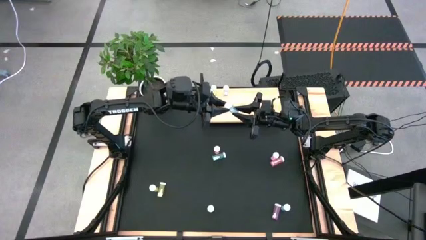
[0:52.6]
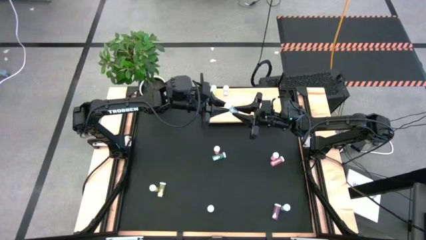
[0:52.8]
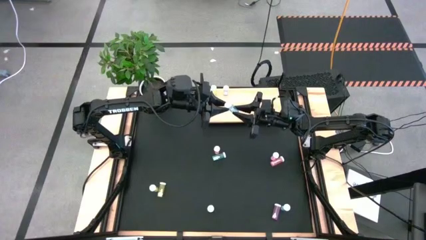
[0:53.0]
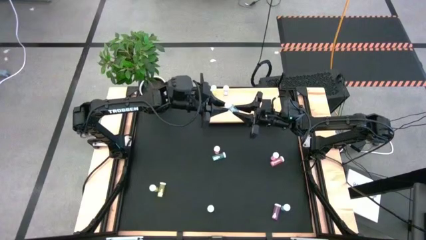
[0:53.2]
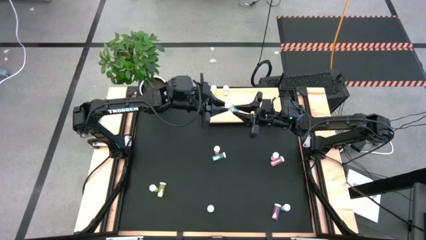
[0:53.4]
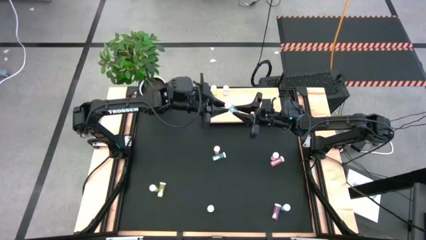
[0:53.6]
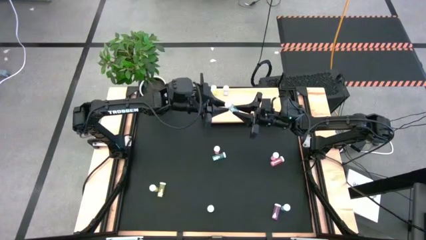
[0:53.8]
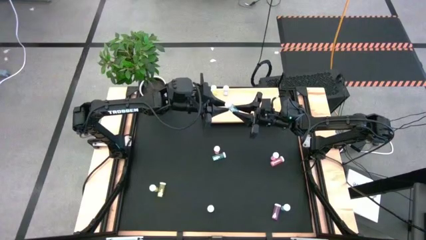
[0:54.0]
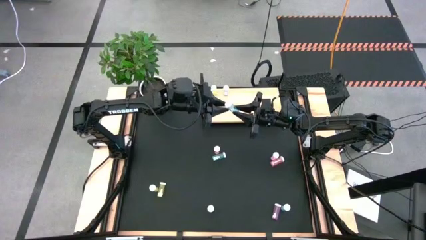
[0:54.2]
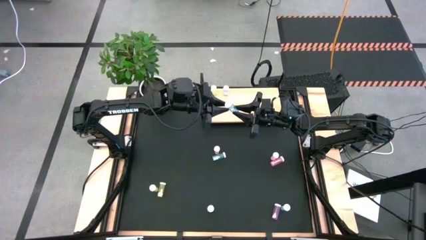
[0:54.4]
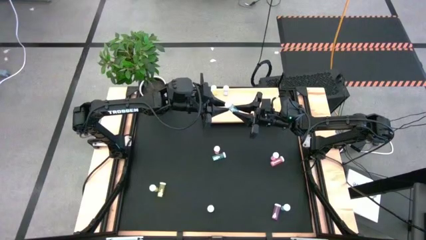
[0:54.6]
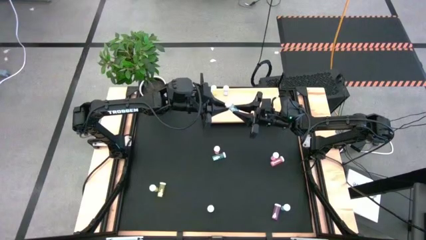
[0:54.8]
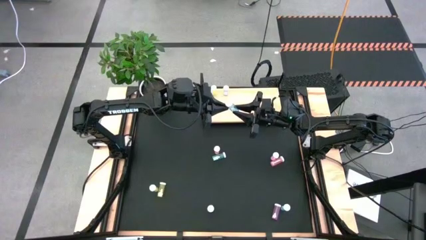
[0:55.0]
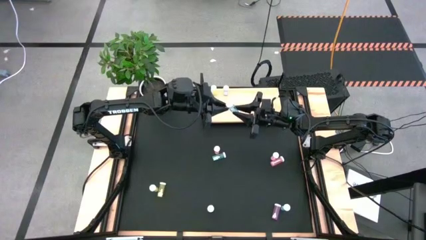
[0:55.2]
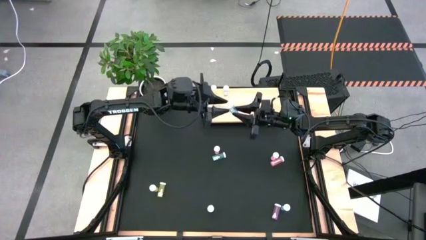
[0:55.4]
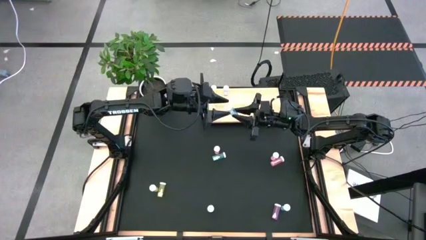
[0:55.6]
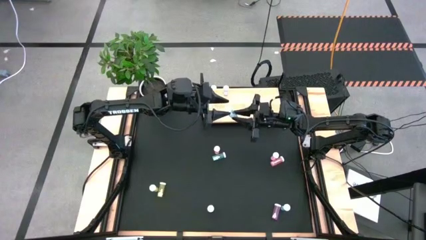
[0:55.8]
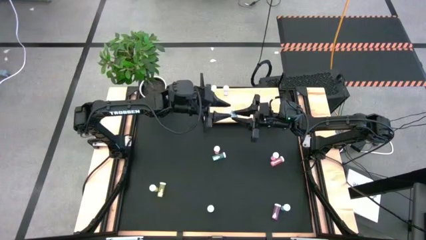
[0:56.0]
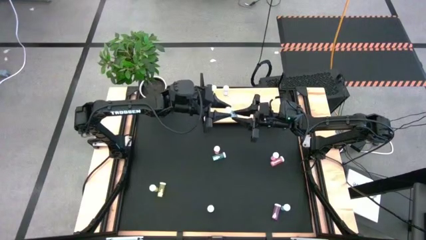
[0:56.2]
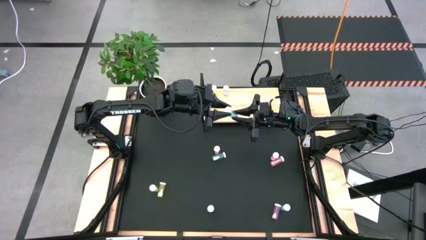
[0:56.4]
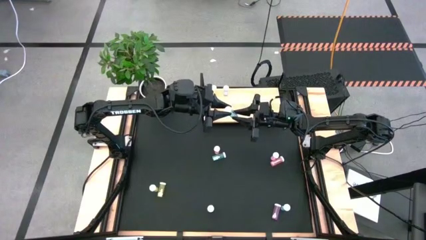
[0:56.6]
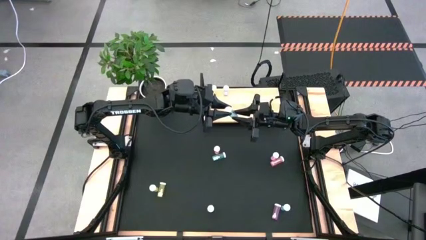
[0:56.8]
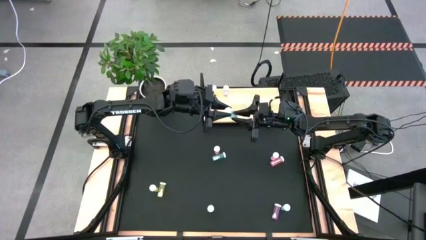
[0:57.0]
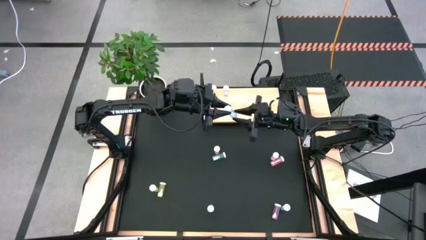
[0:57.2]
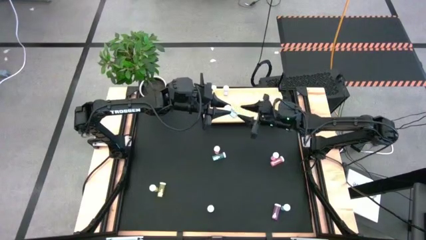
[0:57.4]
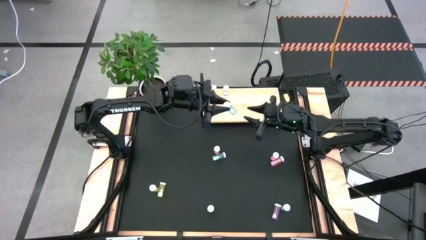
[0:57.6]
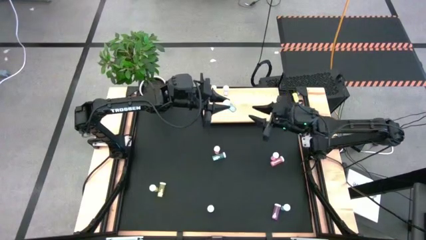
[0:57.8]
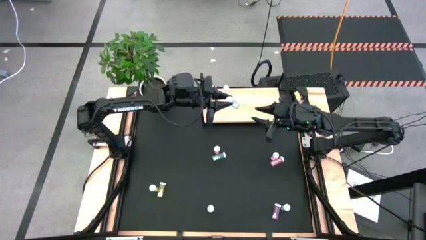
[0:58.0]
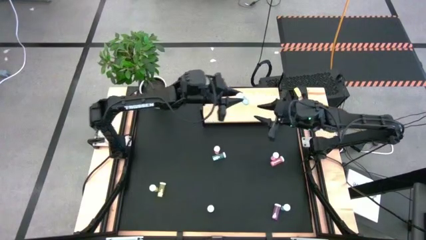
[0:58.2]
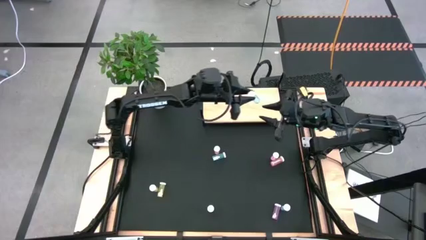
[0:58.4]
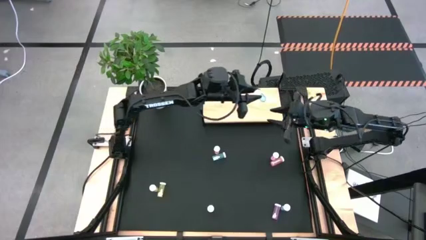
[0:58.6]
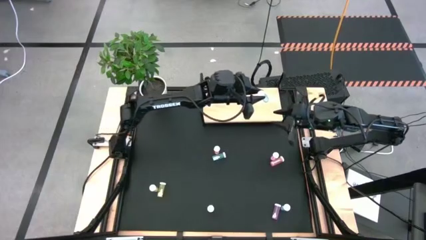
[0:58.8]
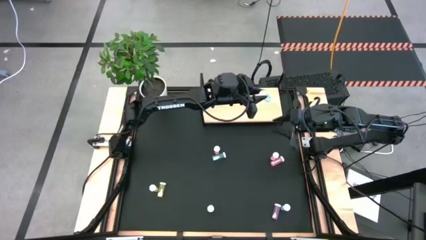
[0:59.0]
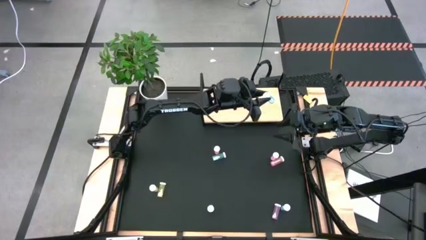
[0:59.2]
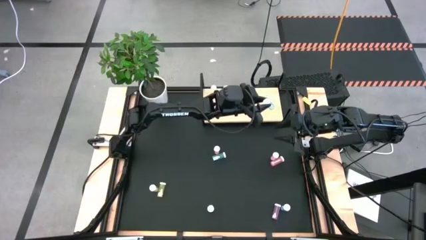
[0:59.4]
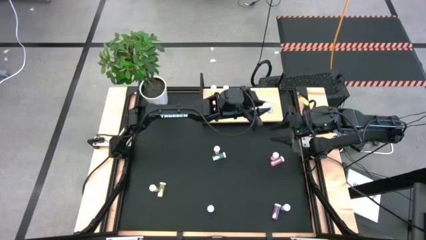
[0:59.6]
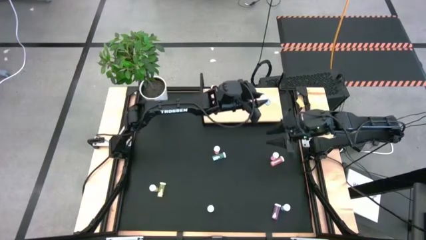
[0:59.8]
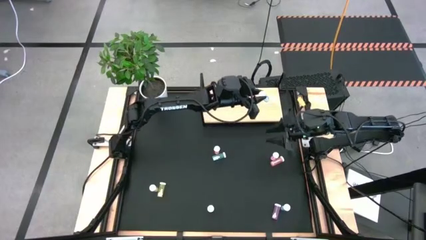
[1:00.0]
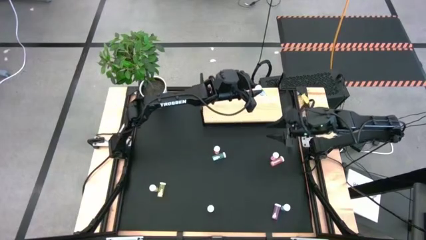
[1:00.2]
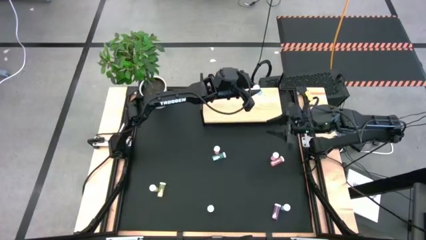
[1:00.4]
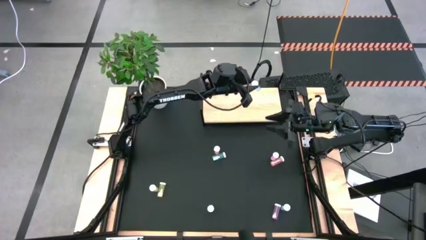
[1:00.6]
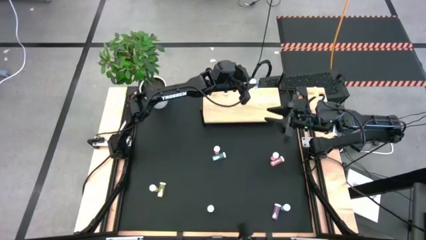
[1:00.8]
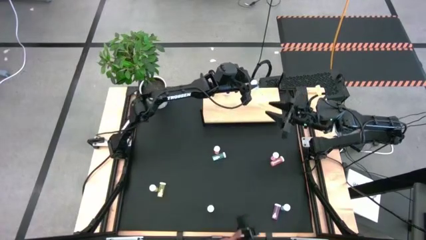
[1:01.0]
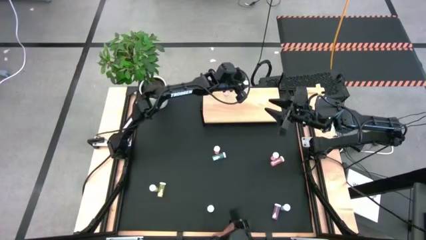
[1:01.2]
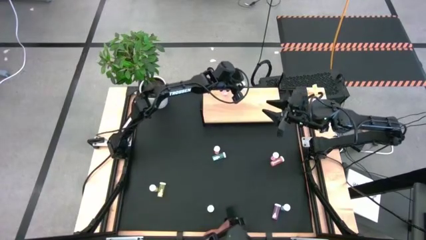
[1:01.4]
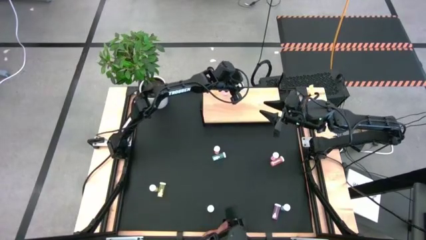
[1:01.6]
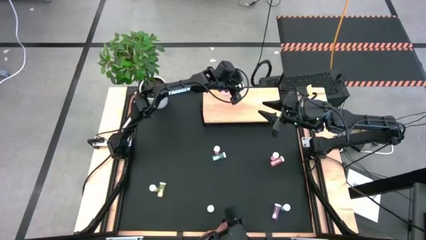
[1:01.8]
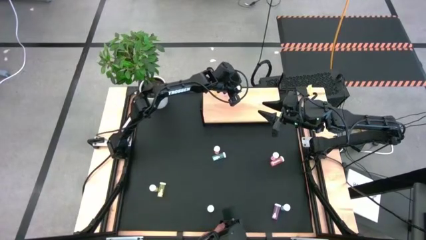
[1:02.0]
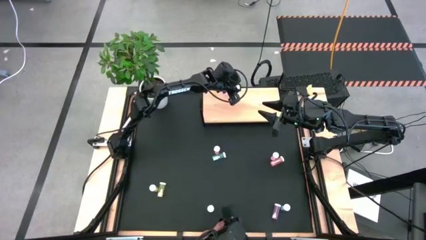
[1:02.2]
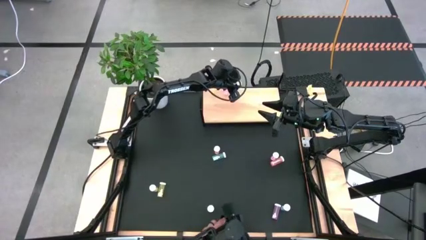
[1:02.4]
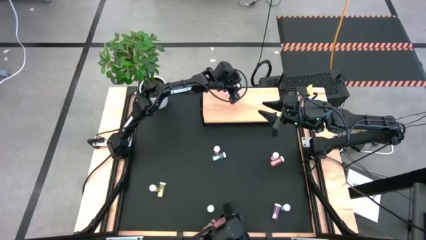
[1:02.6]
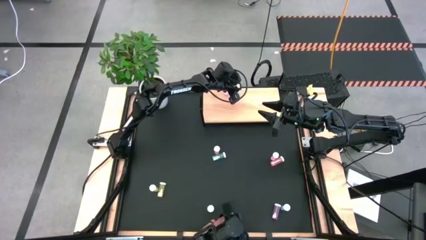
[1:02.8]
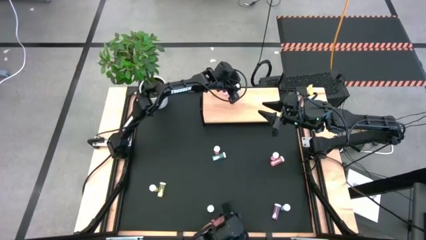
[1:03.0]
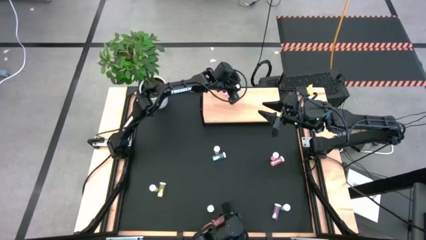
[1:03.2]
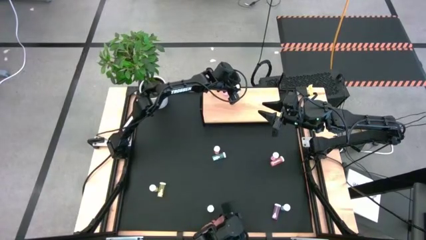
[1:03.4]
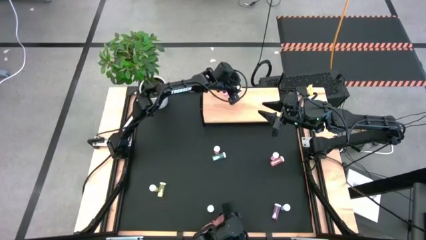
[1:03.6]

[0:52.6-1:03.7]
Task: Pick and place medicine bottles onto shelf by color
Put the bottom left blue pill bottle on the shelf

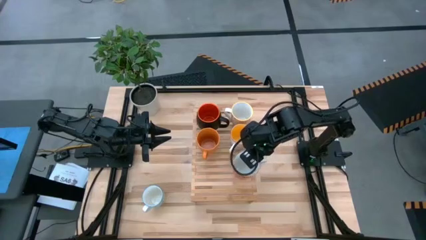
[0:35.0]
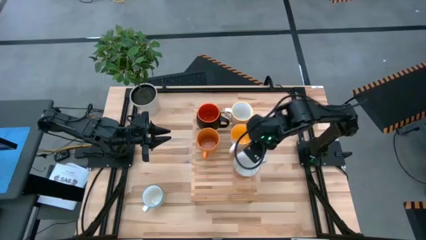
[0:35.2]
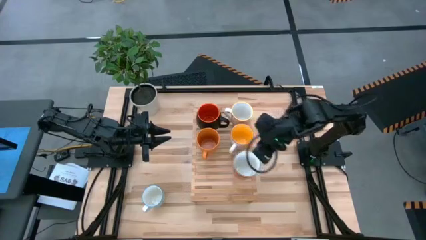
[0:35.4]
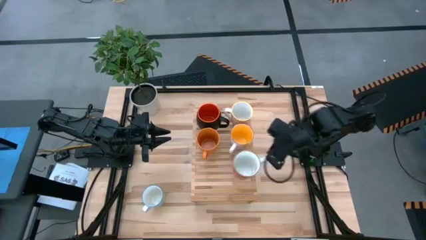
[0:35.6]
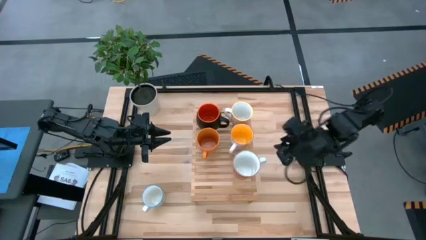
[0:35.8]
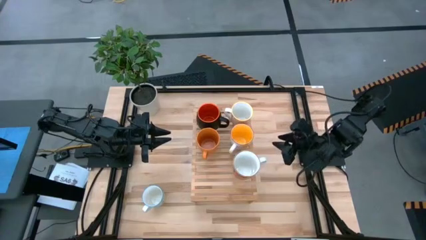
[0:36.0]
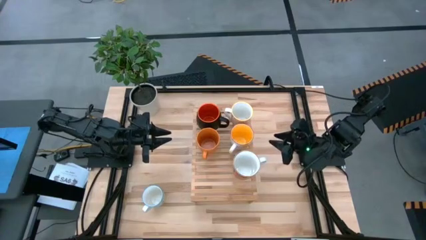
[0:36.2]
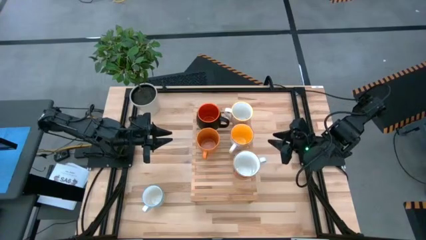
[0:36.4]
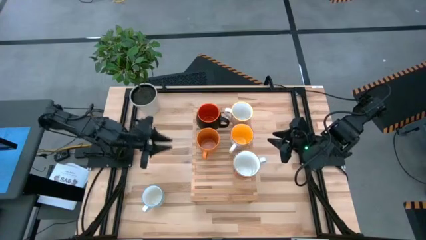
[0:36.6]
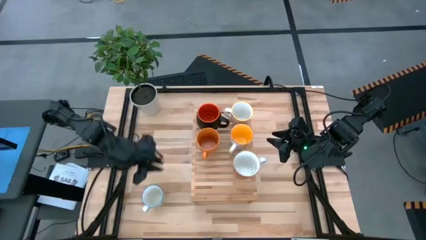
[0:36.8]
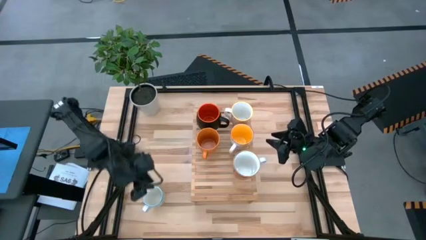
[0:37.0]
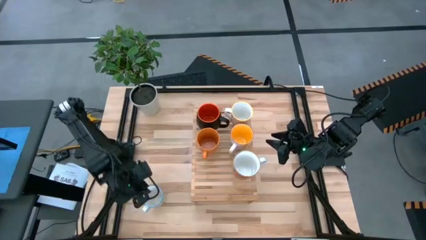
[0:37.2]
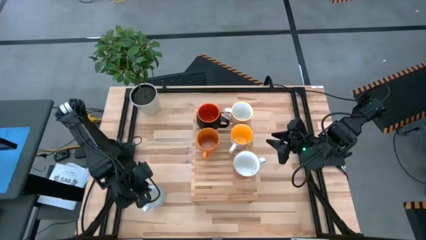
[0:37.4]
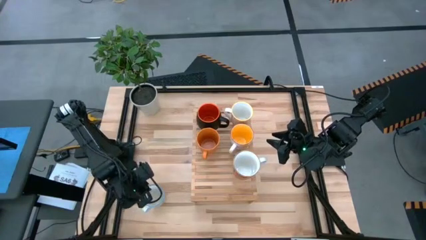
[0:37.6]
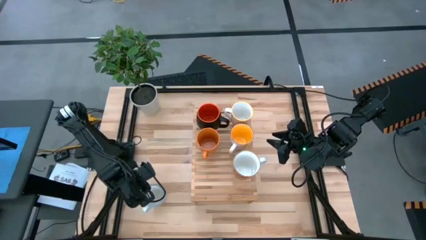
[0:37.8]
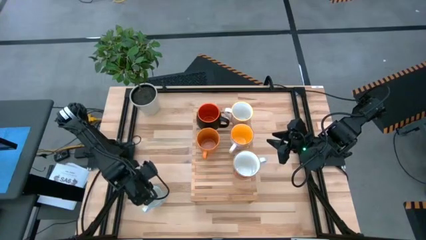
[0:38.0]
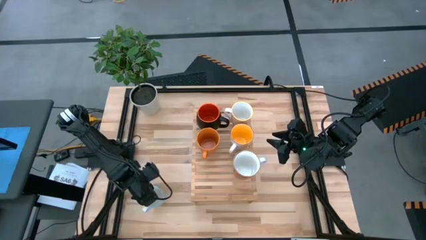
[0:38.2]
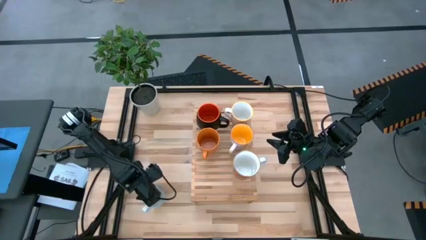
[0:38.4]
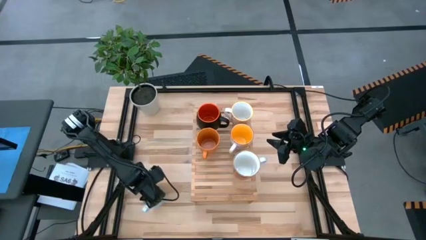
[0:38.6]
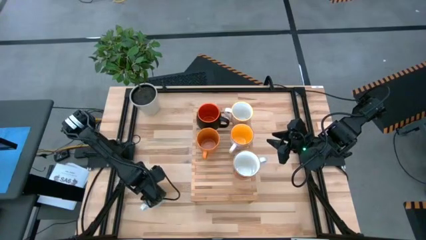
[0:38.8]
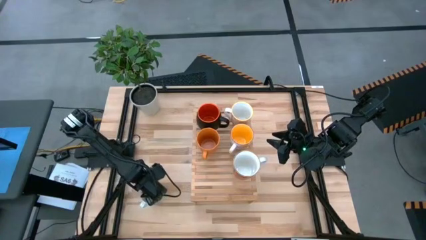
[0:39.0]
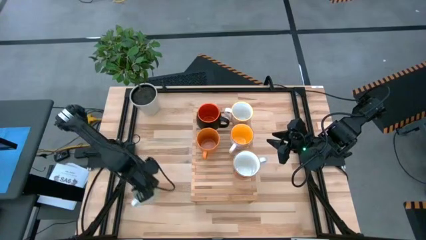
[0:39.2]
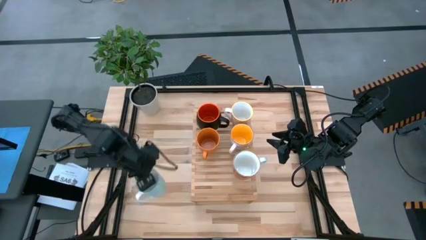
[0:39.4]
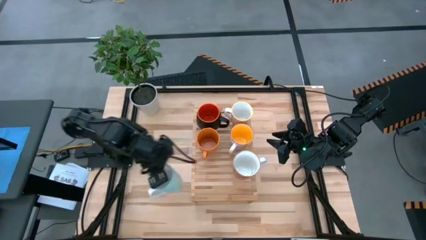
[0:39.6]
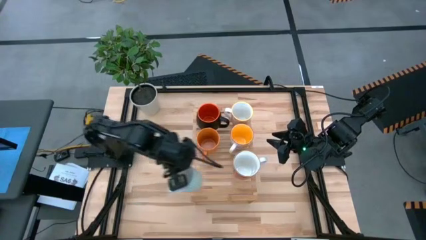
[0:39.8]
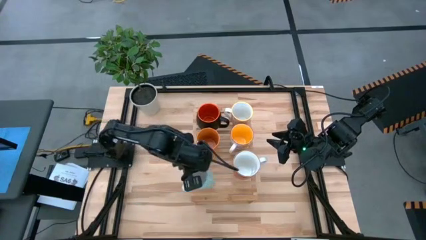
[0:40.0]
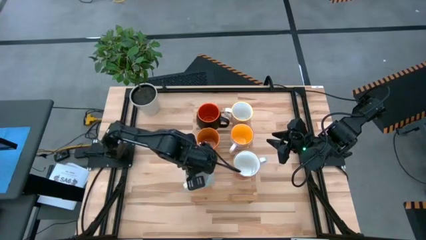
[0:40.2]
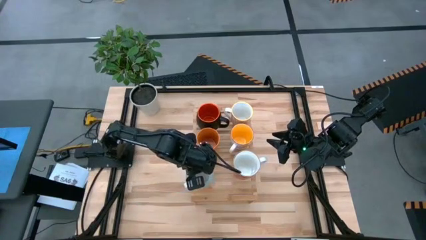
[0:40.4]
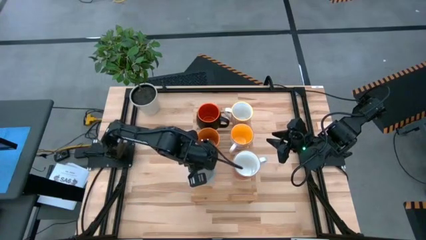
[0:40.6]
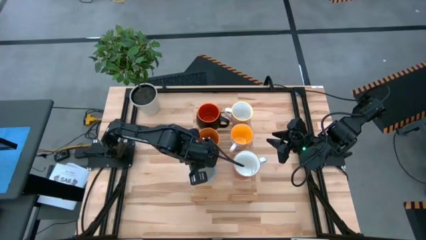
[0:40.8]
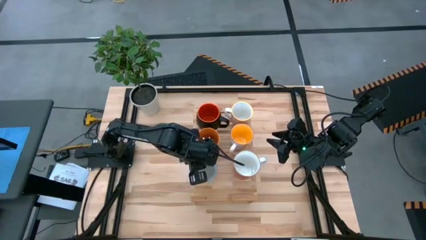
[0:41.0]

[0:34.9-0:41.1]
Task: Place coffee mugs
Put the blue patterned mug on the shelf
